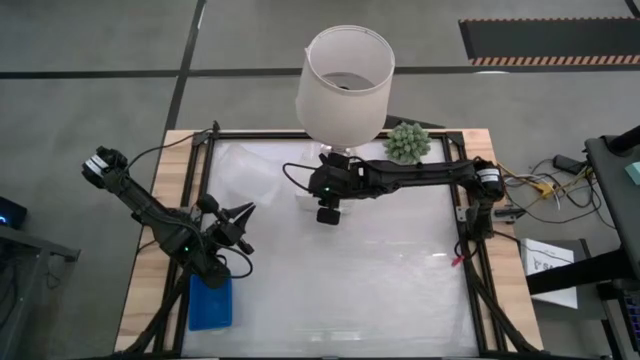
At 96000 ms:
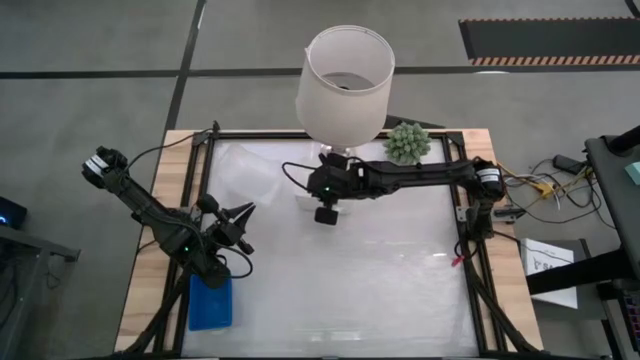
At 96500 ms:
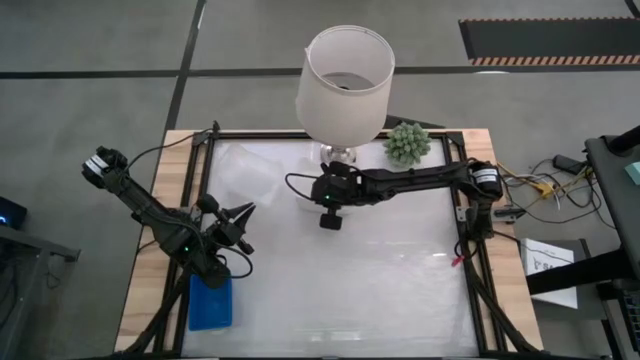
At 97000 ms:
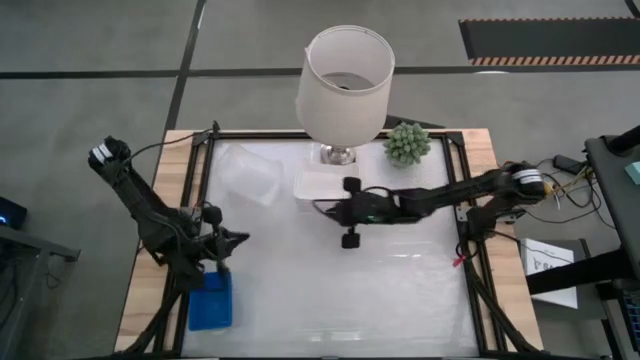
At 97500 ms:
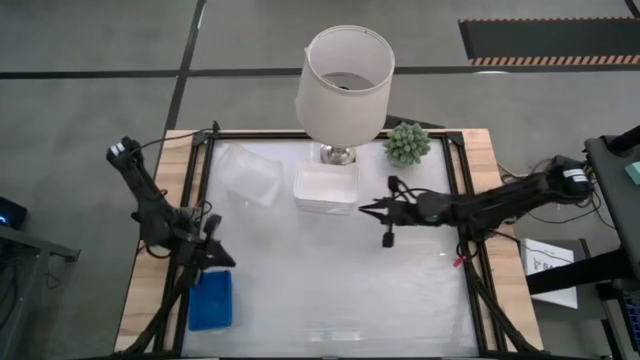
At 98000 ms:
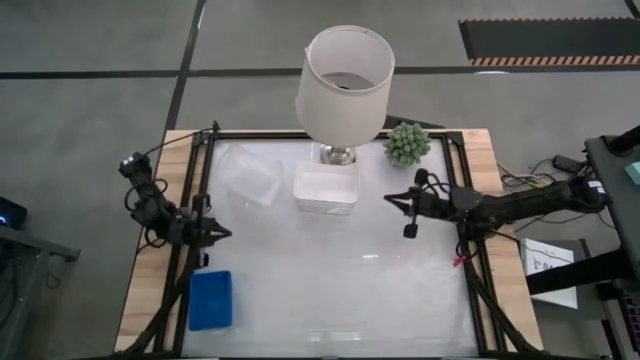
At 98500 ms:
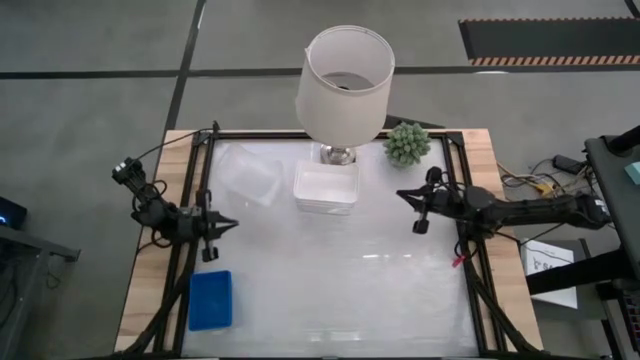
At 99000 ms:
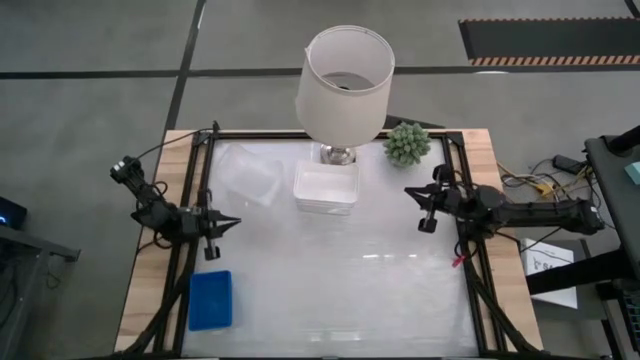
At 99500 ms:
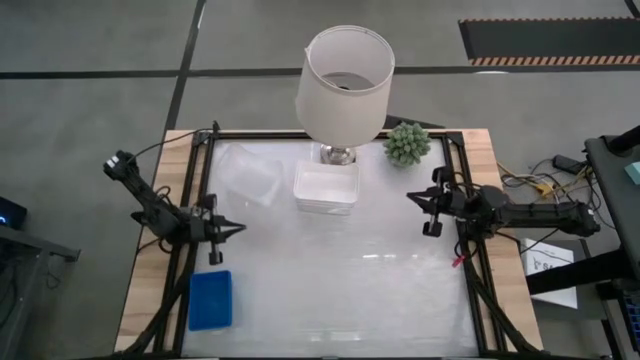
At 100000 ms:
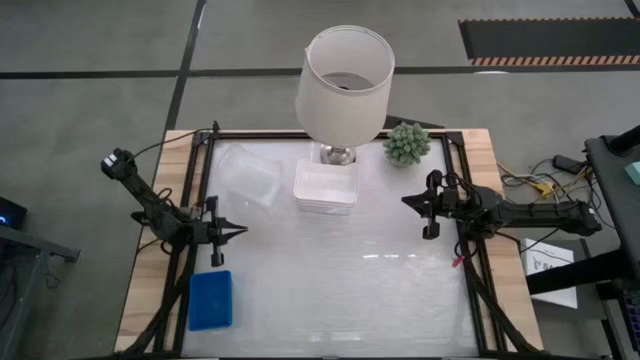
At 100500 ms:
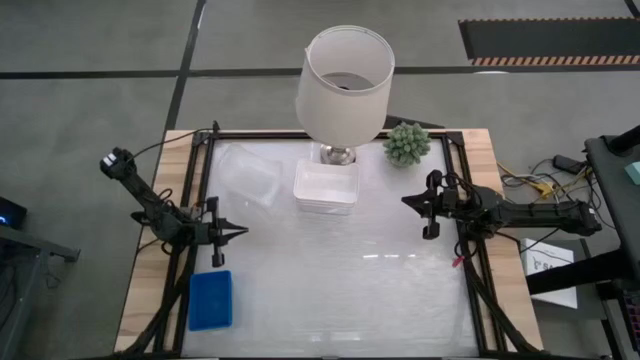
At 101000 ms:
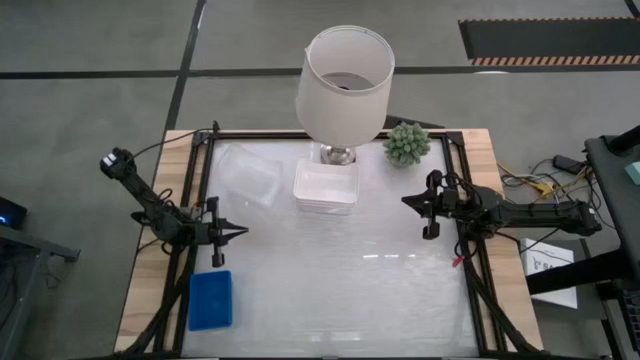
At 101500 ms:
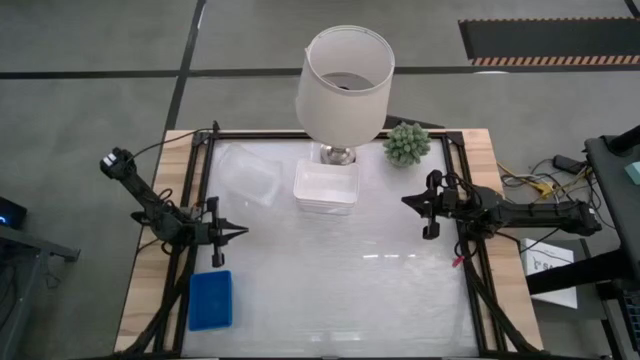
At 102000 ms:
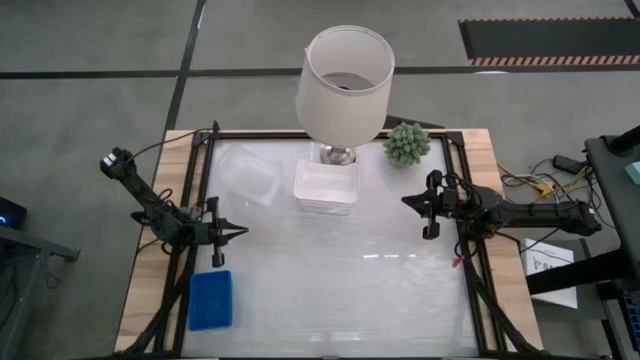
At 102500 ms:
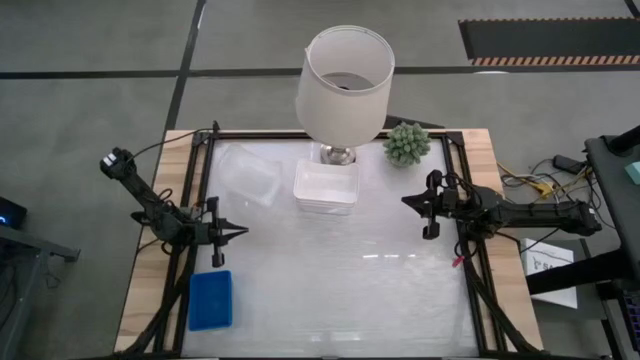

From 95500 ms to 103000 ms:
Return to Home Position

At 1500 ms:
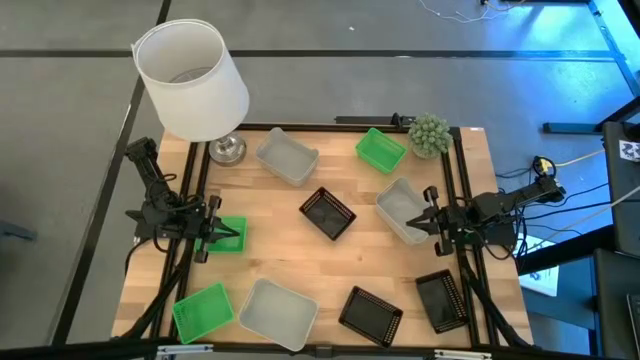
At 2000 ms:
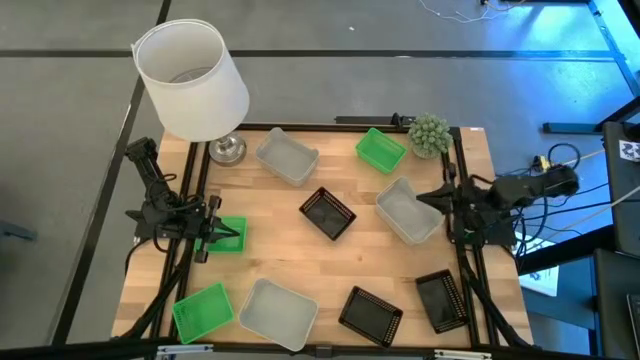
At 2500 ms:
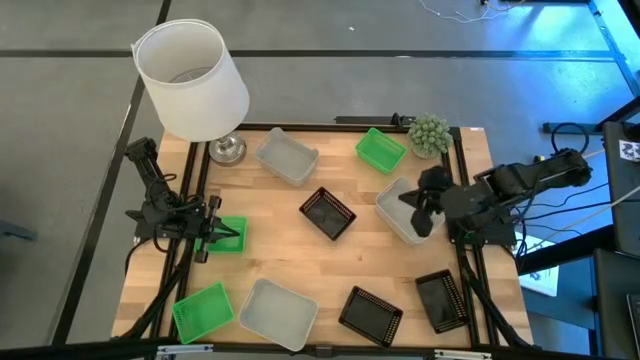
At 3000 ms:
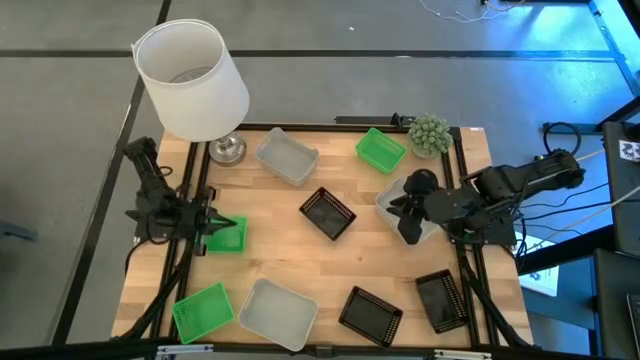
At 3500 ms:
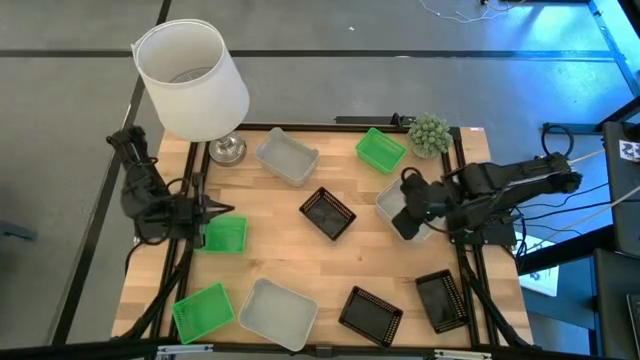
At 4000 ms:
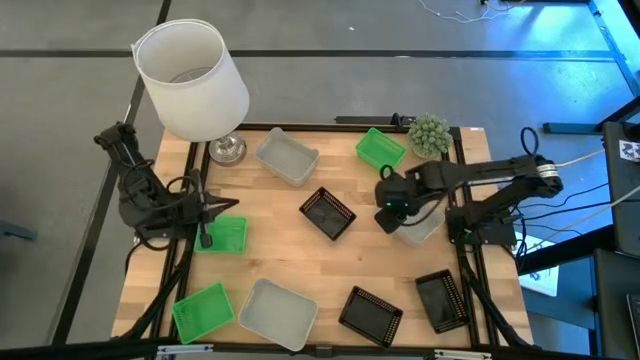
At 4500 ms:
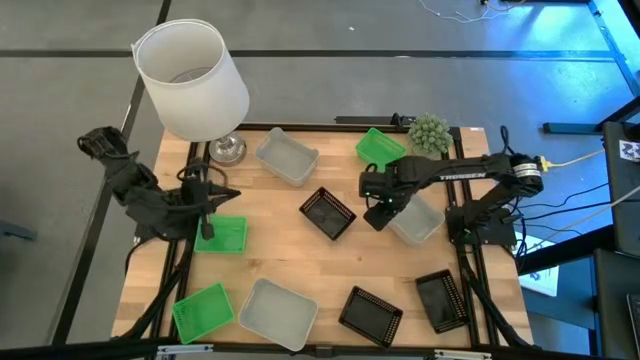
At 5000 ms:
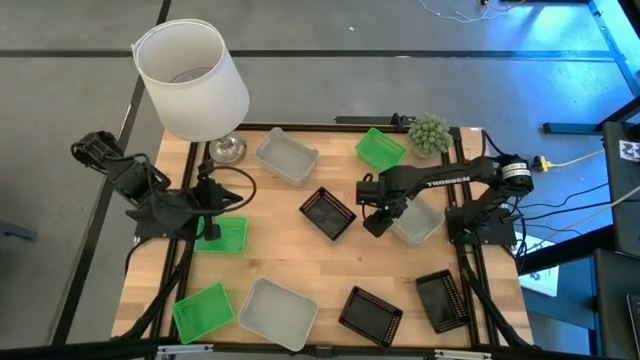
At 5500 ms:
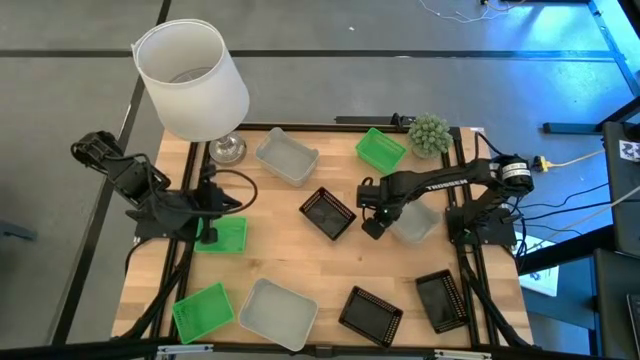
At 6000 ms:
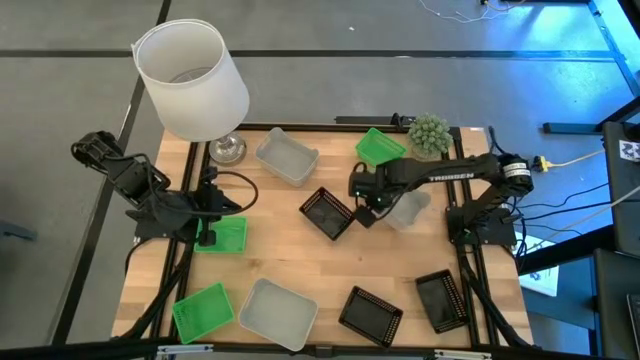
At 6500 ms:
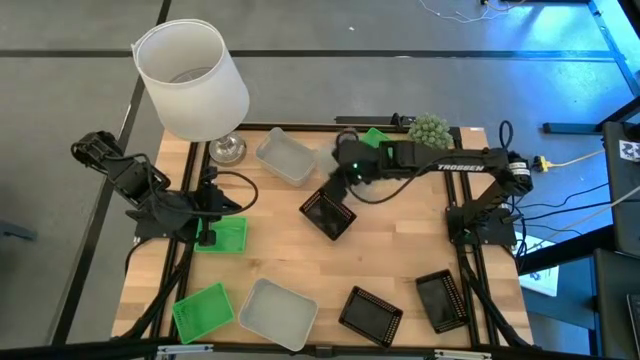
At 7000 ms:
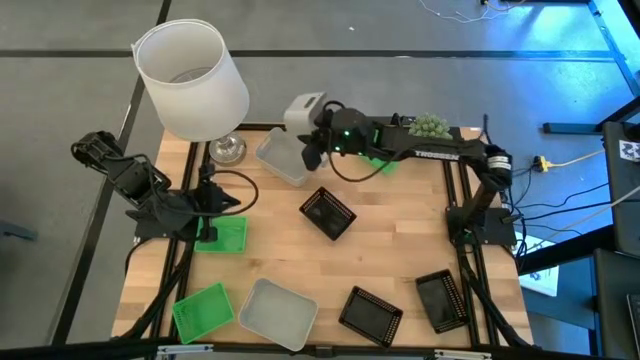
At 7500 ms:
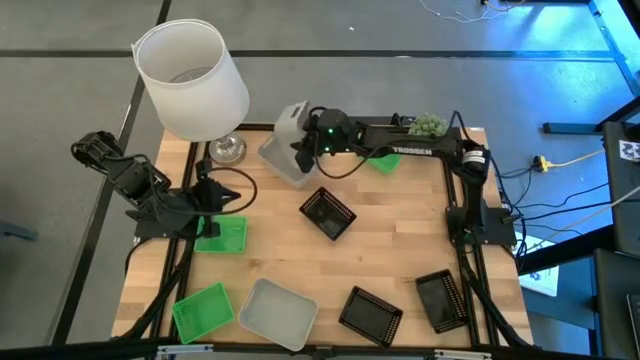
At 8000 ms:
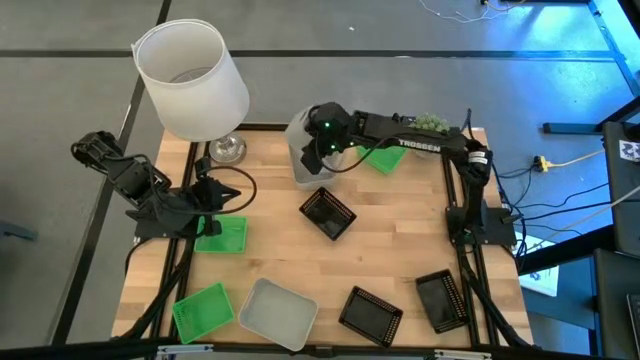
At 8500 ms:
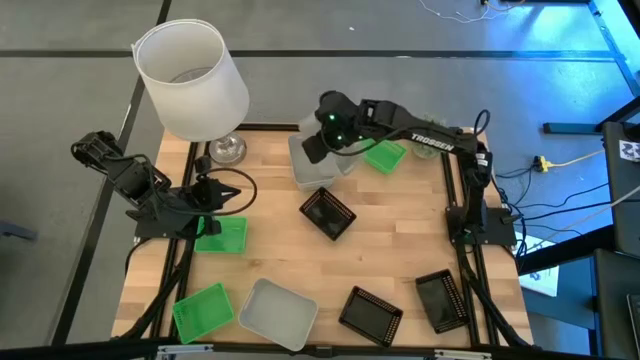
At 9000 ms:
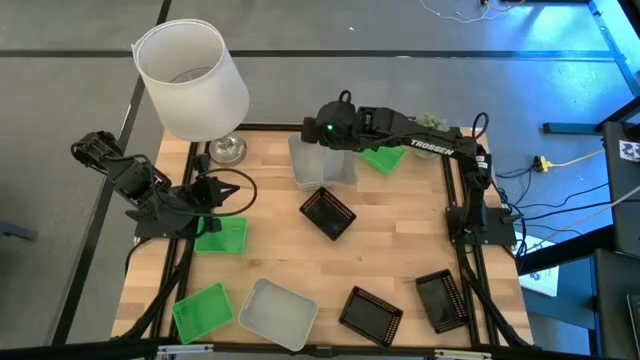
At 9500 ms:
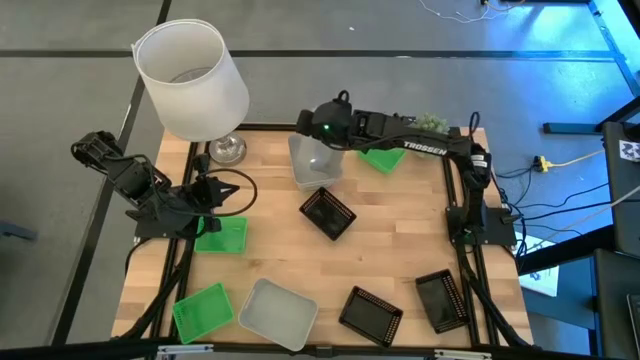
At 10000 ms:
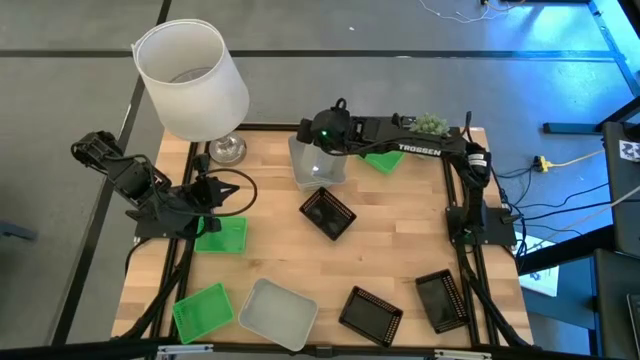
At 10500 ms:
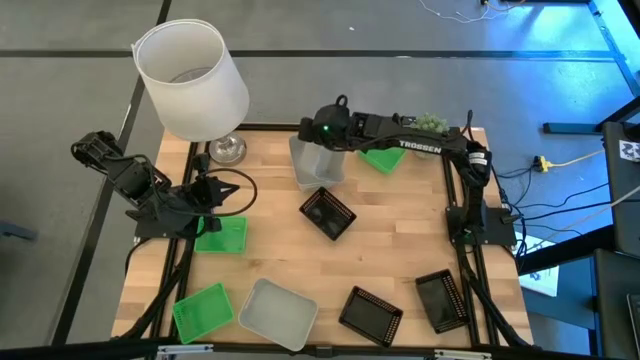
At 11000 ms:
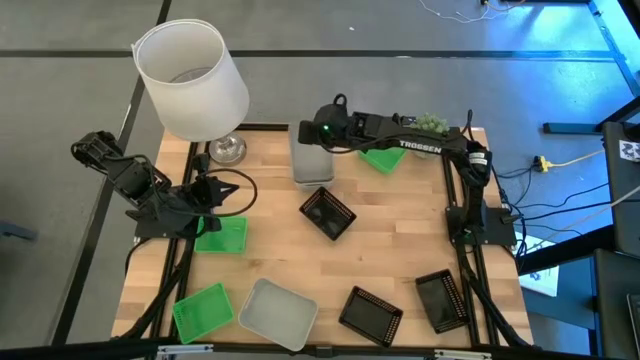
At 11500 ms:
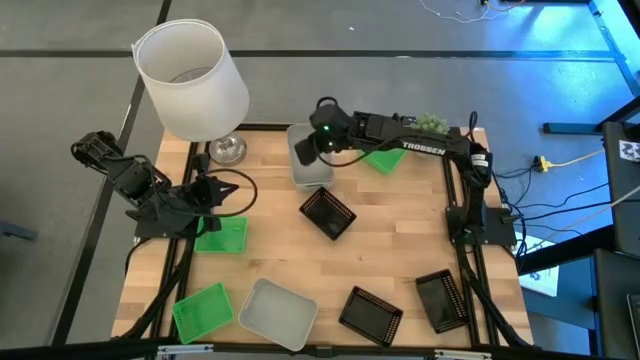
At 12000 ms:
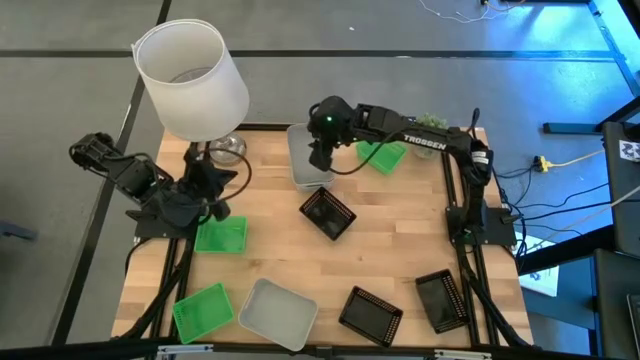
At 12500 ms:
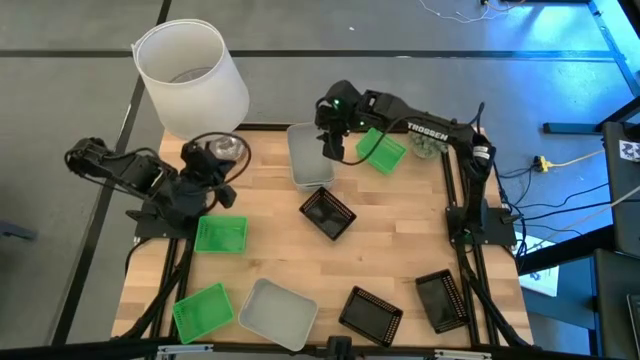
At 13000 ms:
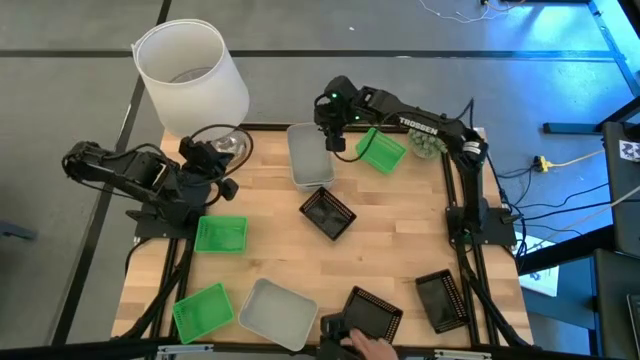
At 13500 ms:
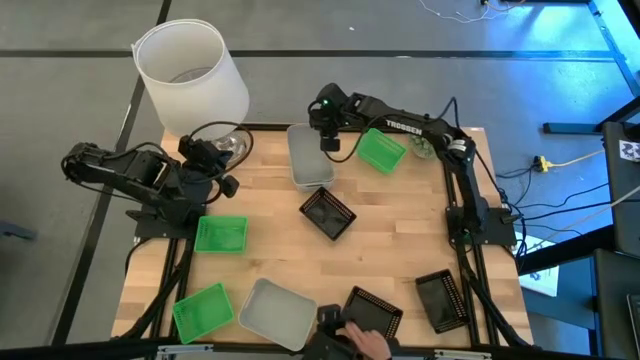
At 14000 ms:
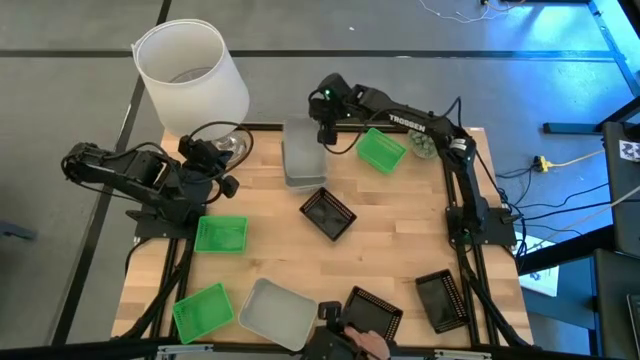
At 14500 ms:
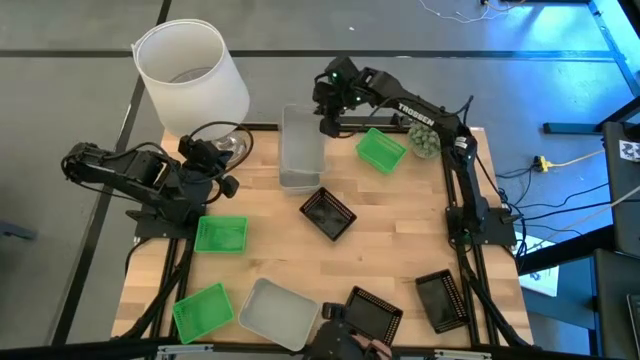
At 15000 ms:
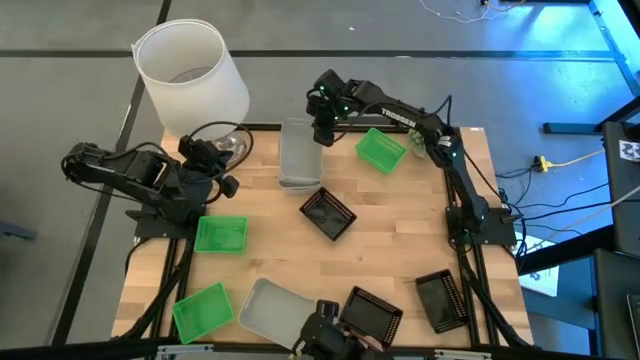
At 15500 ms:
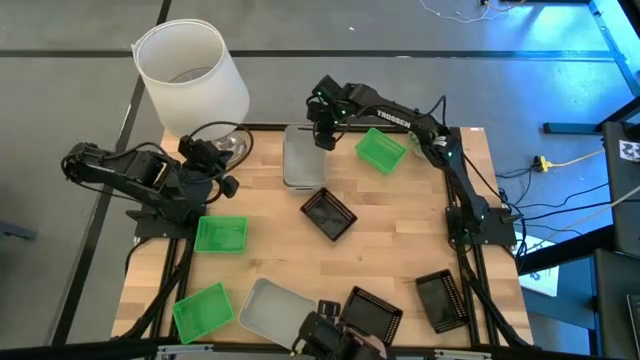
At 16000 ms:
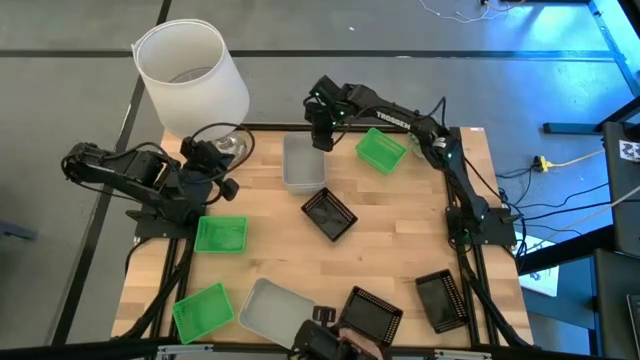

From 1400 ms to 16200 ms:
Stack the middle gray bin on the top gray bin
